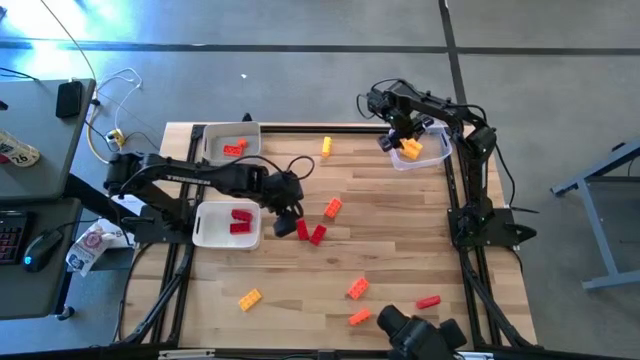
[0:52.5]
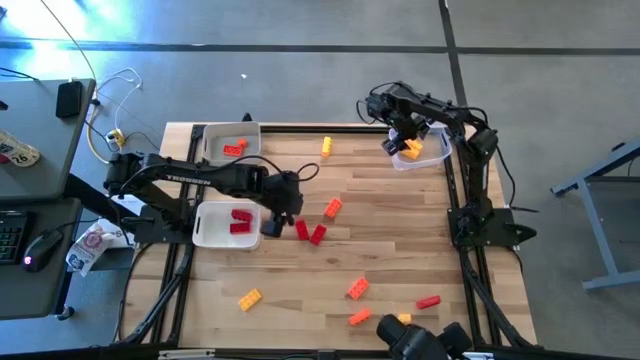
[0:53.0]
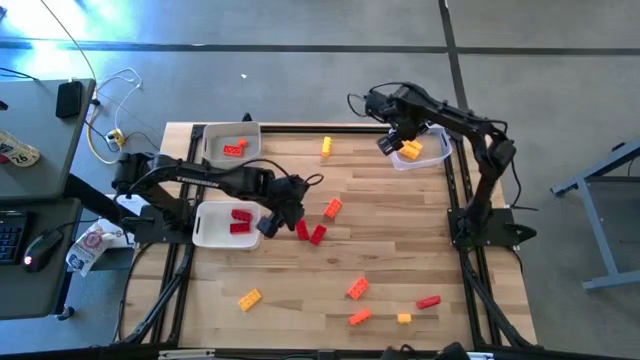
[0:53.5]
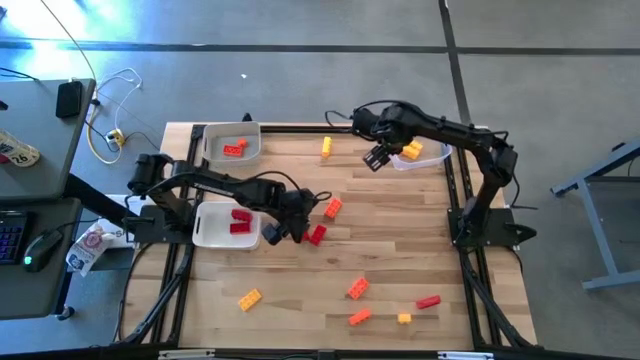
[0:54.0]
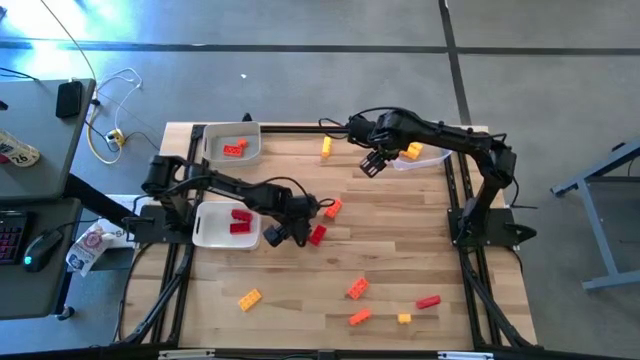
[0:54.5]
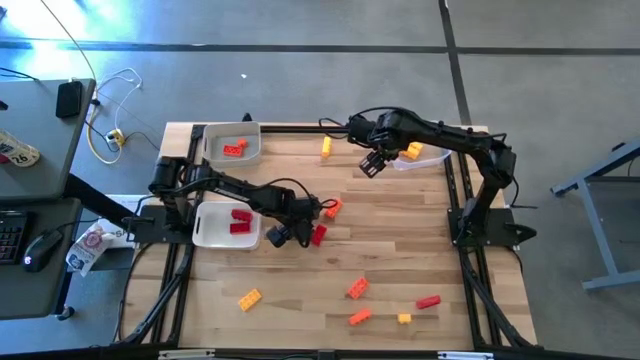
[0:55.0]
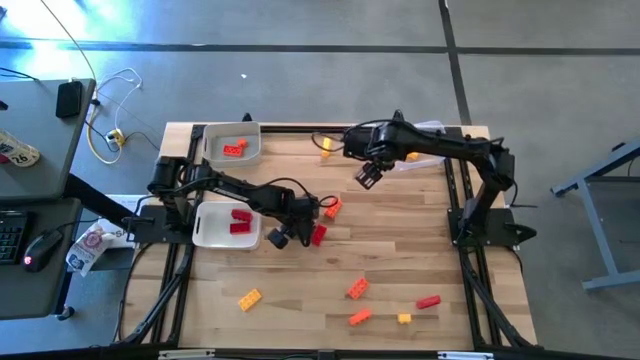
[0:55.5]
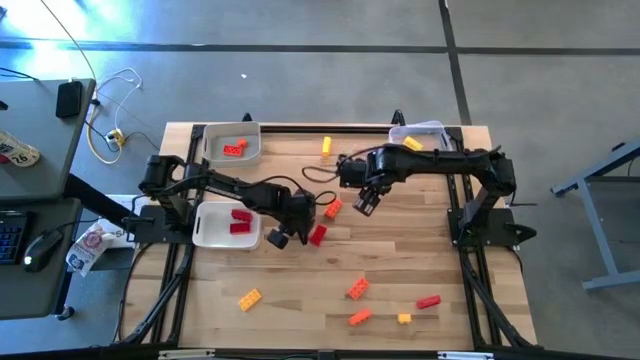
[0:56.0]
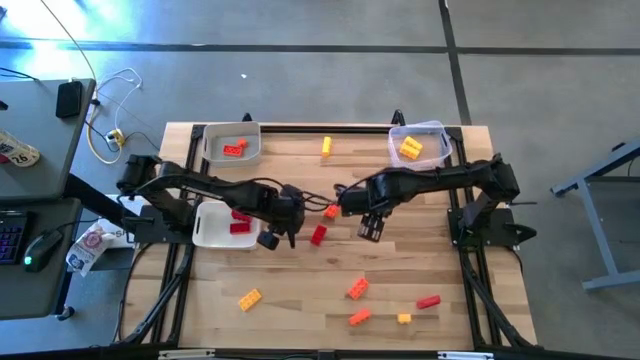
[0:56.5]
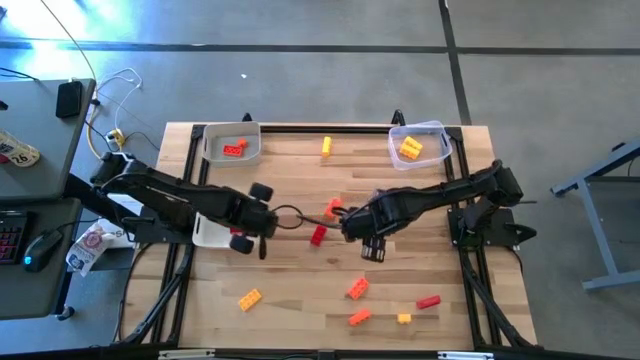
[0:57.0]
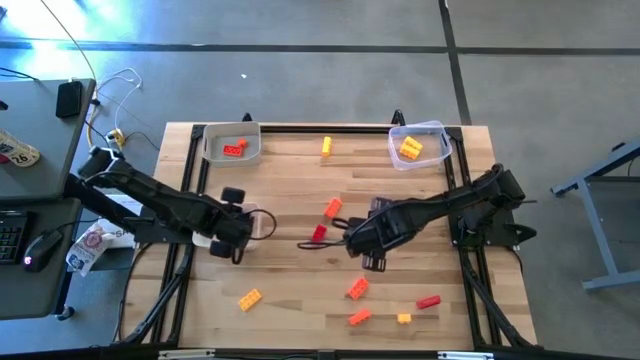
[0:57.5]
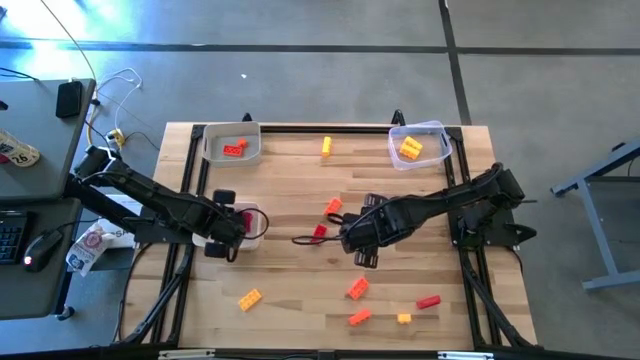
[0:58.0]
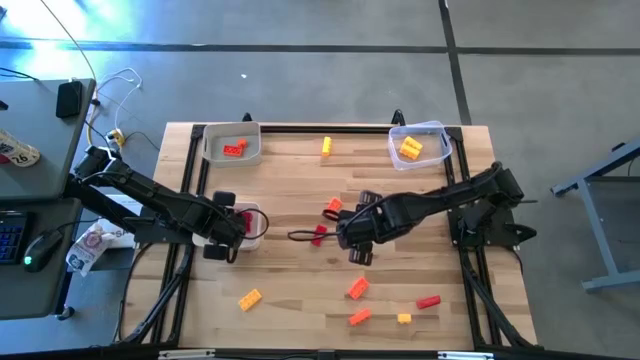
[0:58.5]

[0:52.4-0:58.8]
Task: Sort & place blocks by color
Put the red game piece into the white bin

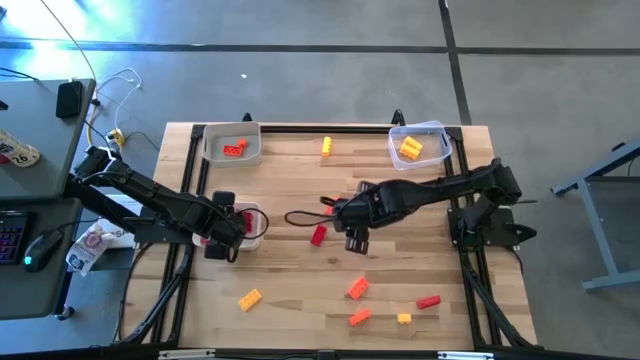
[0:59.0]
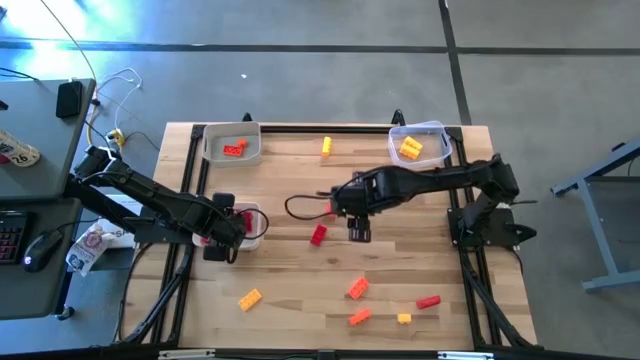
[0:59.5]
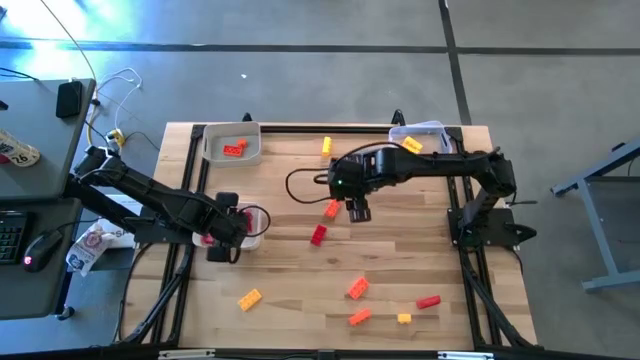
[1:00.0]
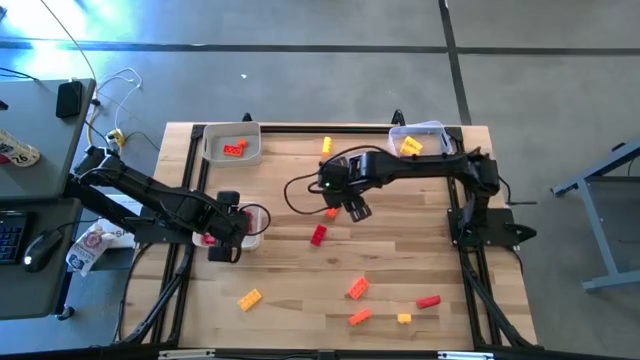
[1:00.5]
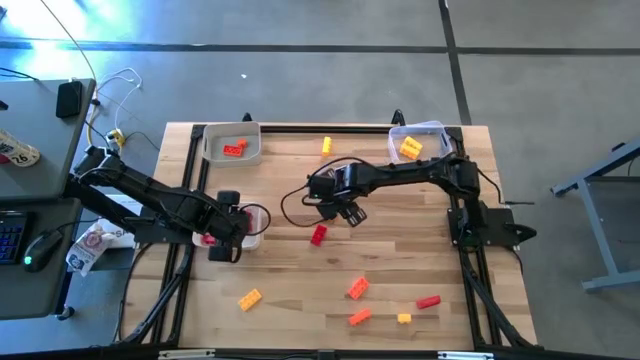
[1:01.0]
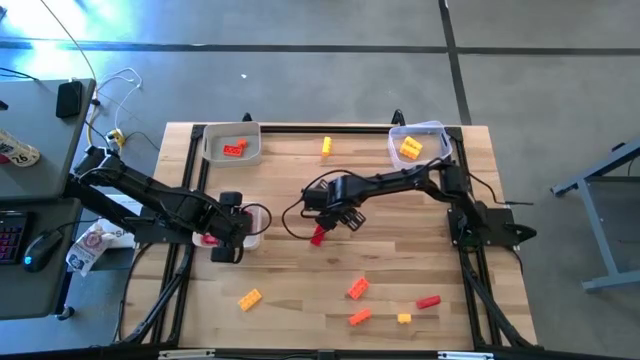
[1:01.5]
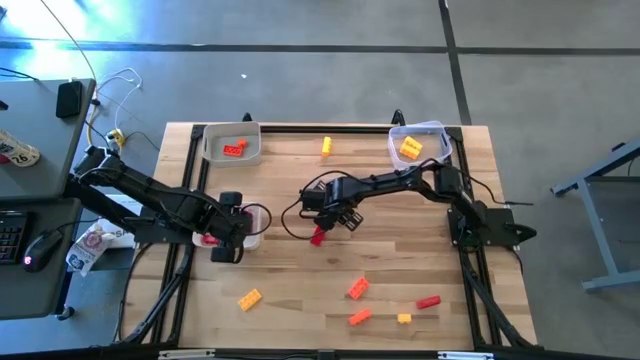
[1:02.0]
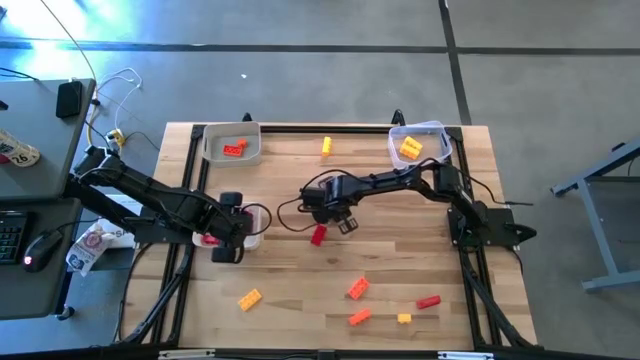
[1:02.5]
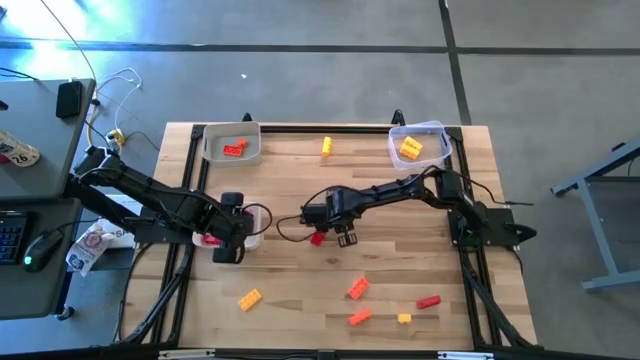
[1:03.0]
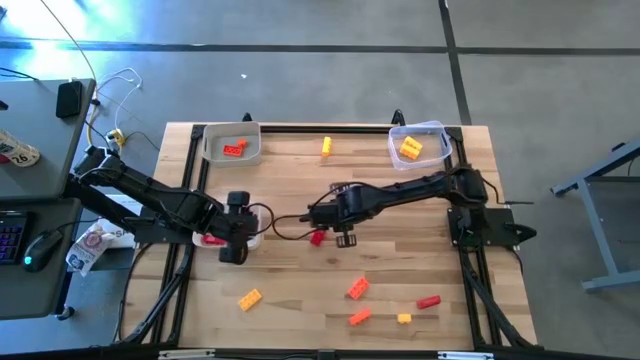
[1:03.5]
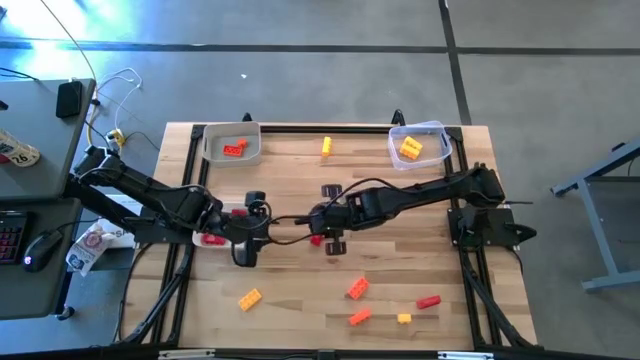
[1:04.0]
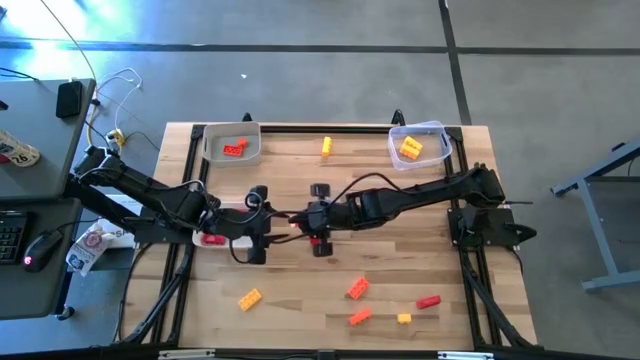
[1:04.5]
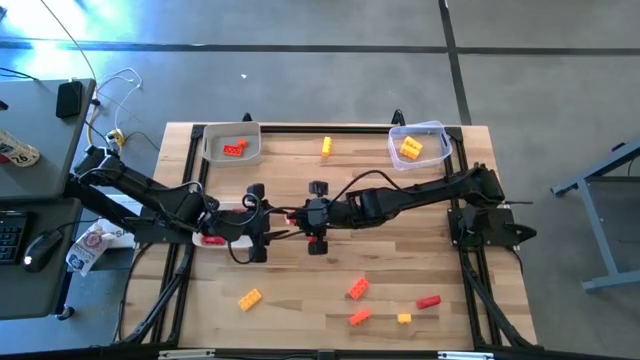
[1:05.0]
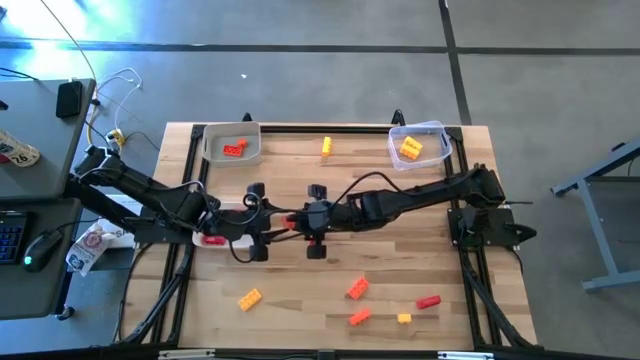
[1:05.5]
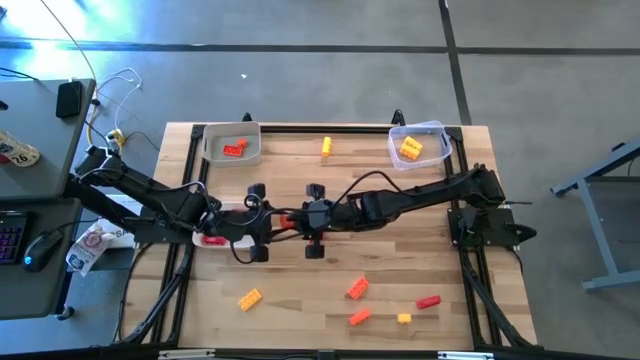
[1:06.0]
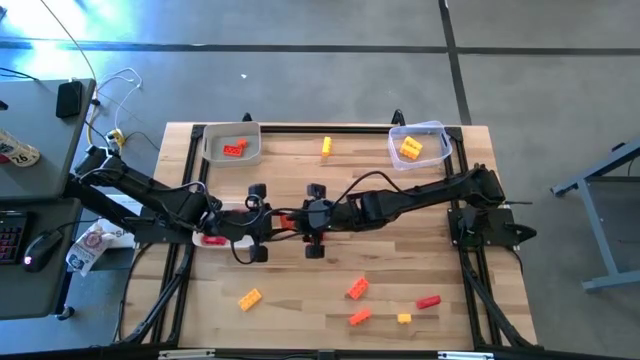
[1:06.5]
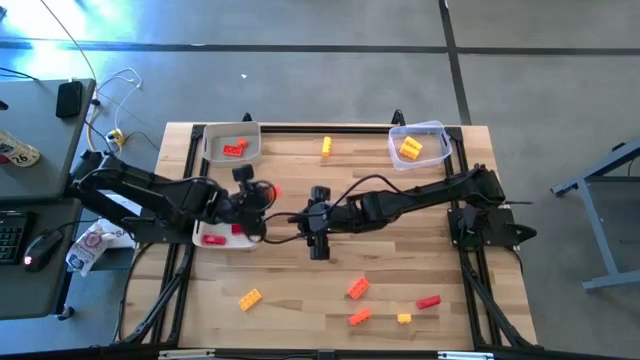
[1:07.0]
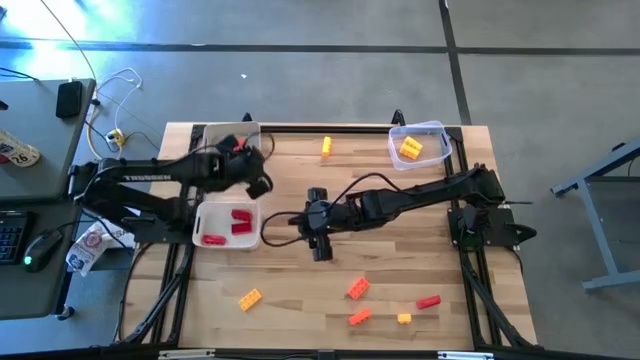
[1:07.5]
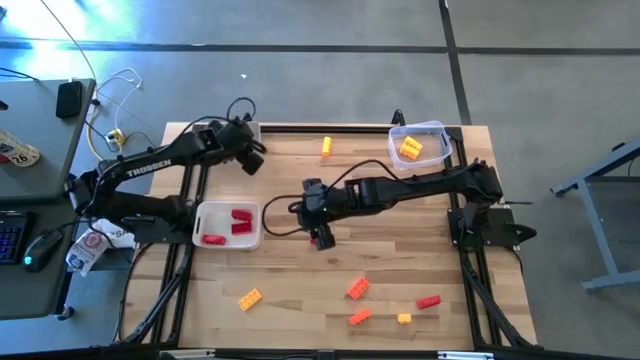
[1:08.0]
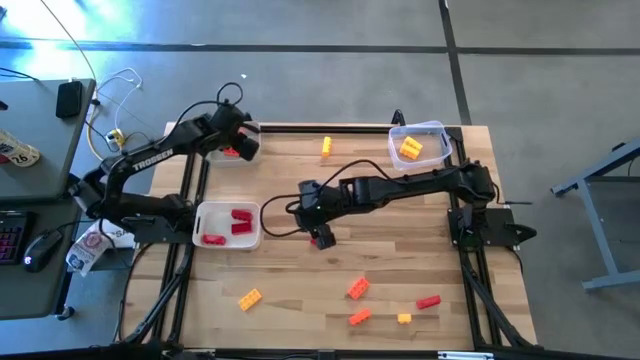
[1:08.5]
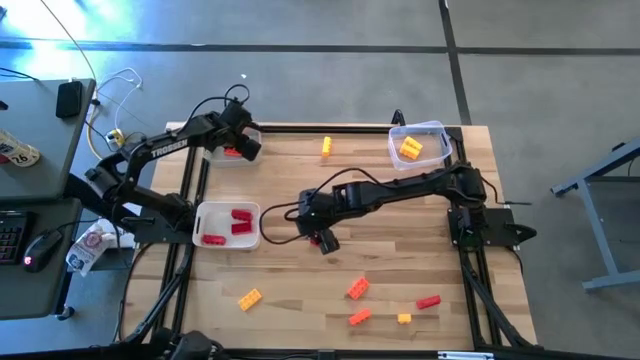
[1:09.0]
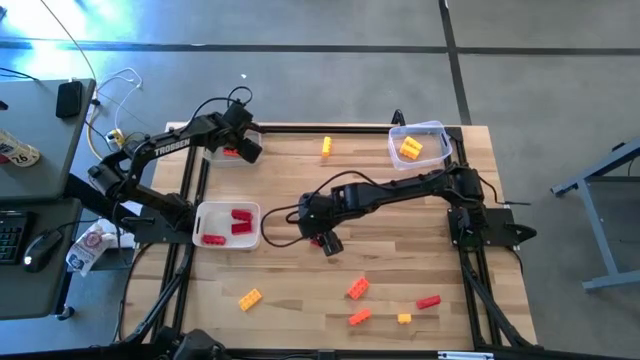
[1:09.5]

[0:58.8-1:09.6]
Put the orange game piece into the gray bin

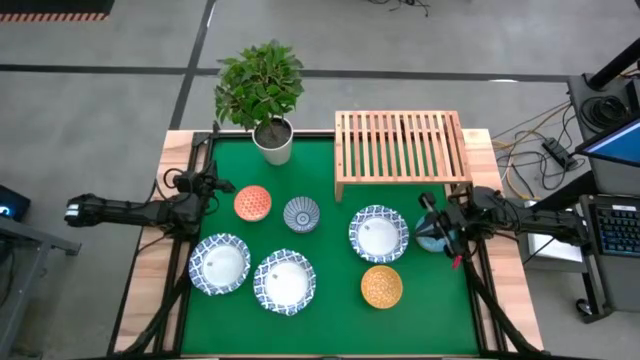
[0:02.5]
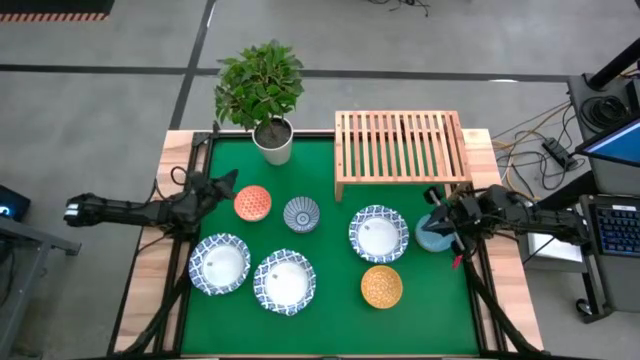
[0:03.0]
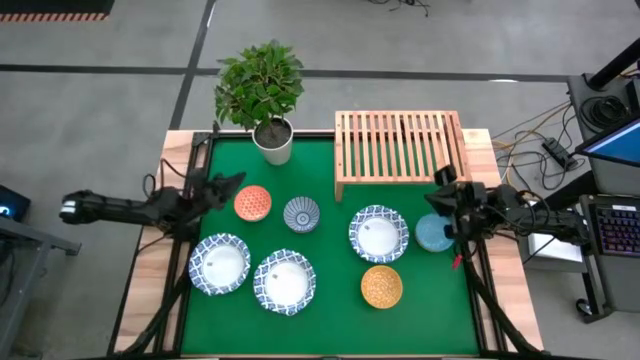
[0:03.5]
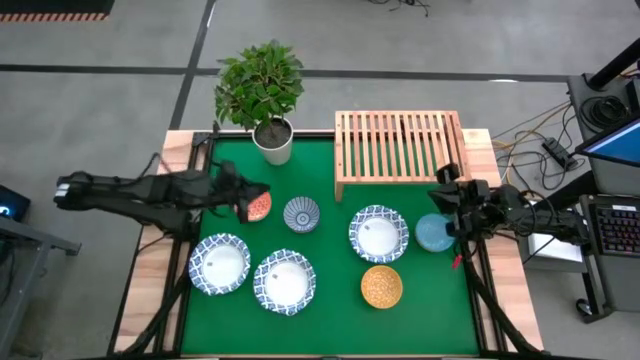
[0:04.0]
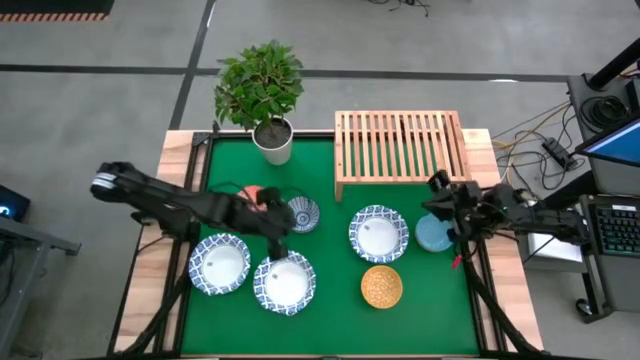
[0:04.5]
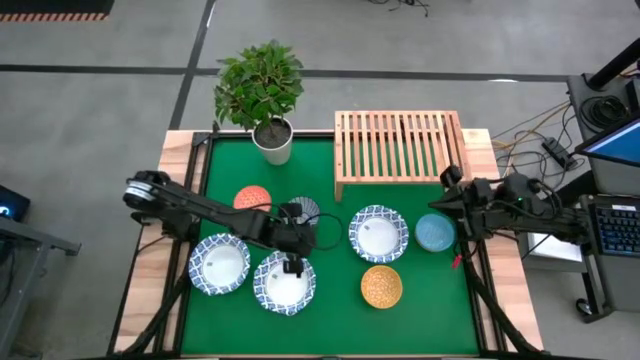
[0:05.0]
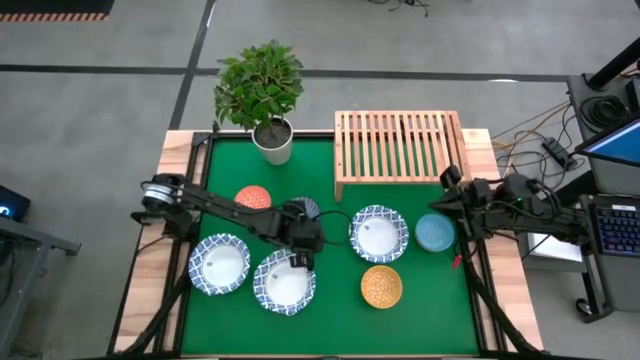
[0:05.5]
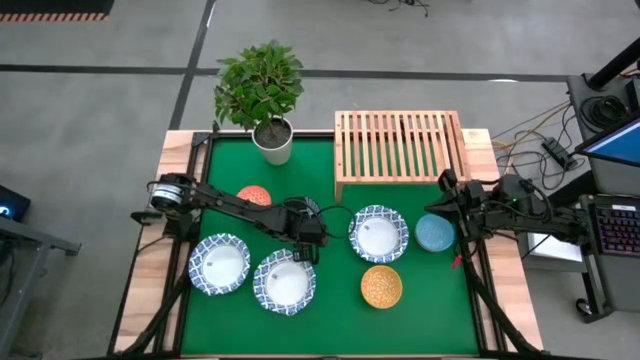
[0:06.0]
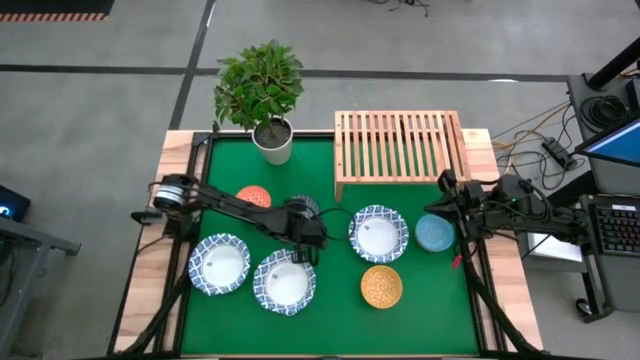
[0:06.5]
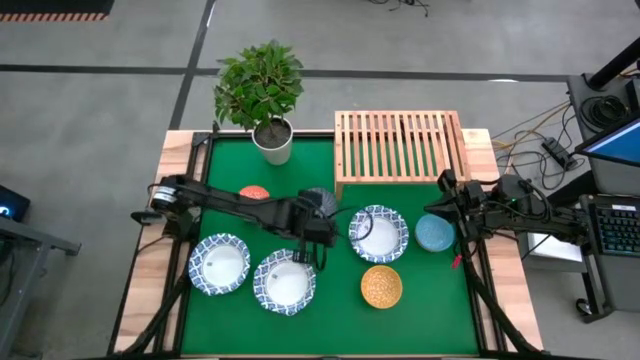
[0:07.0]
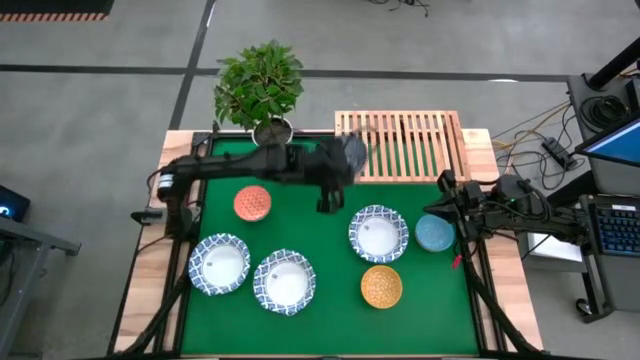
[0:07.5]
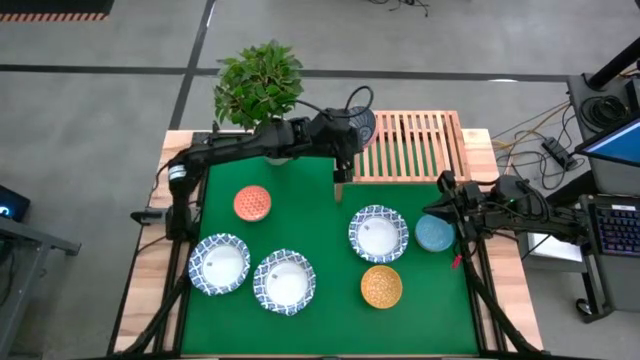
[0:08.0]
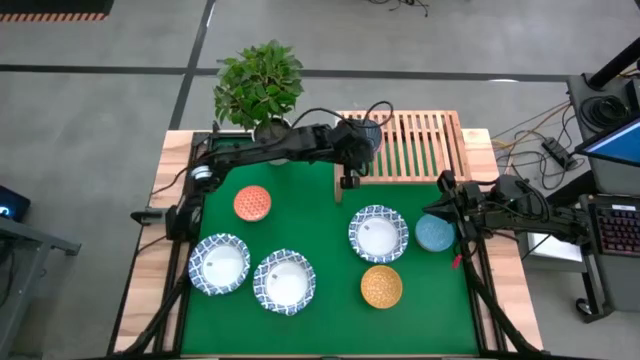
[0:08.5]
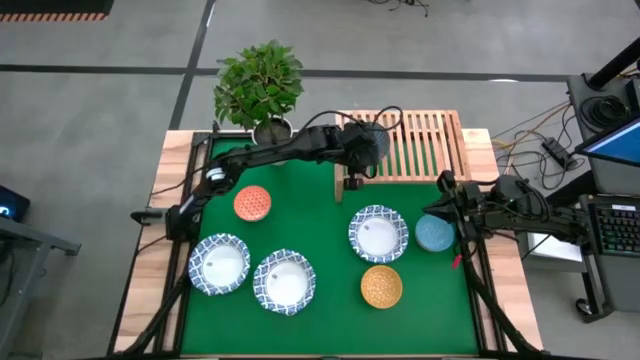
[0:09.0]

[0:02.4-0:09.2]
Task: Place and stack bowls onto a shelf
Put the blue patterned bowl on the shelf
